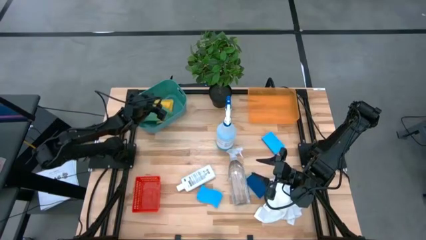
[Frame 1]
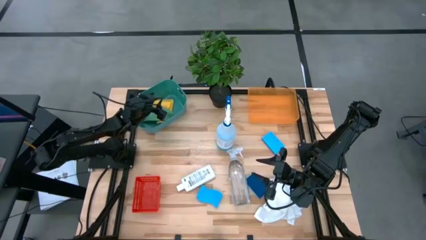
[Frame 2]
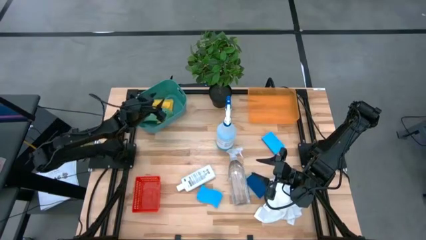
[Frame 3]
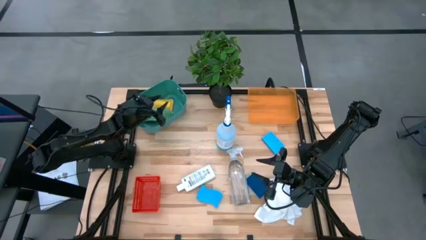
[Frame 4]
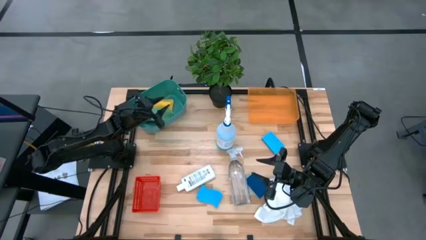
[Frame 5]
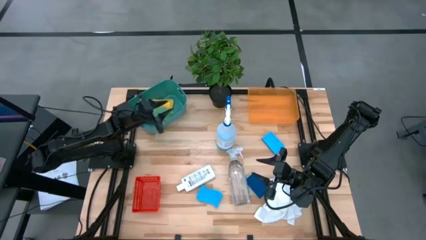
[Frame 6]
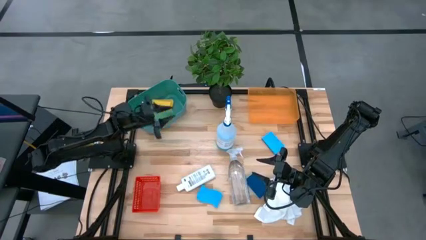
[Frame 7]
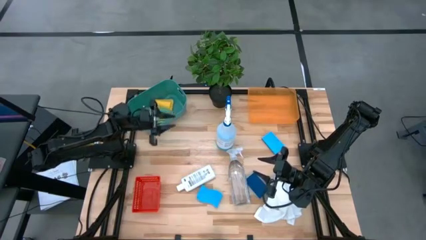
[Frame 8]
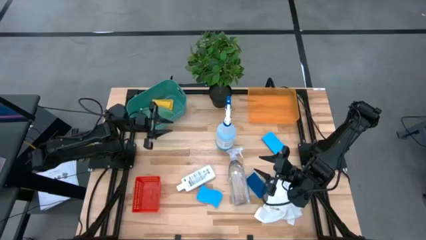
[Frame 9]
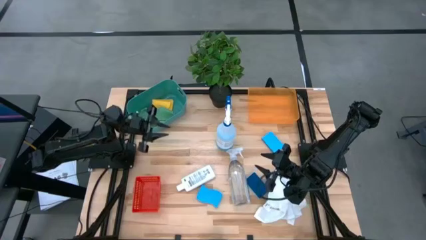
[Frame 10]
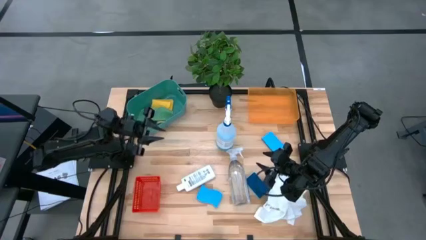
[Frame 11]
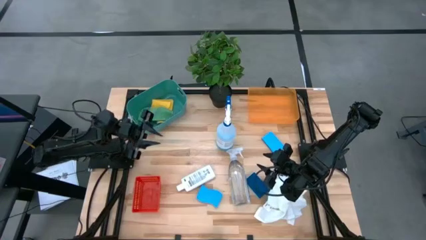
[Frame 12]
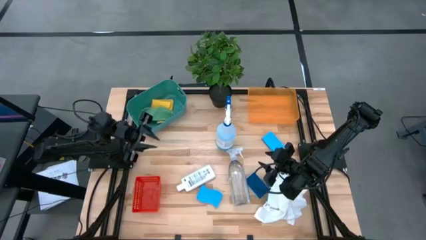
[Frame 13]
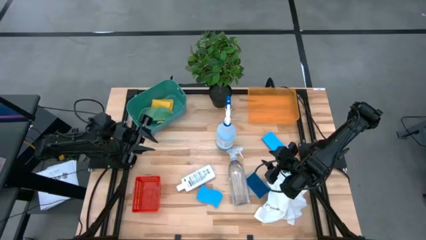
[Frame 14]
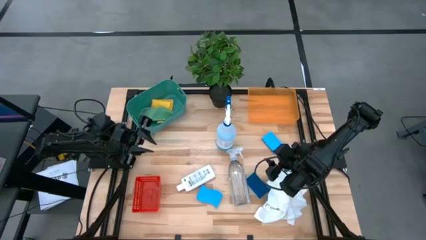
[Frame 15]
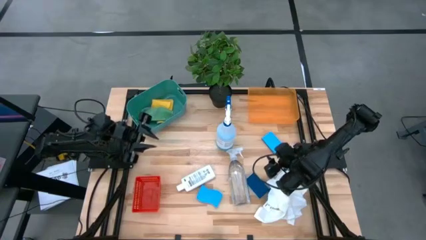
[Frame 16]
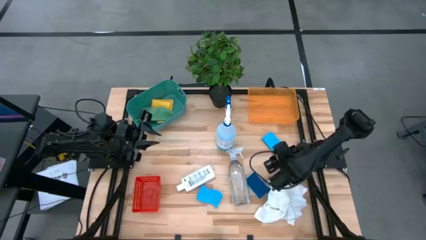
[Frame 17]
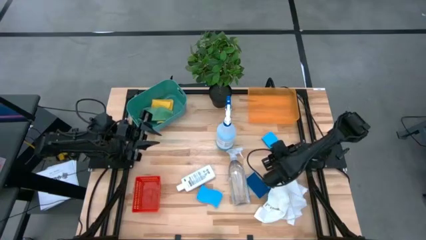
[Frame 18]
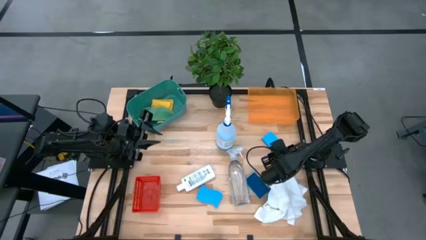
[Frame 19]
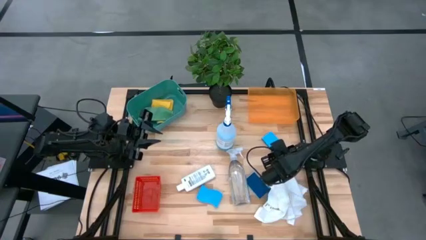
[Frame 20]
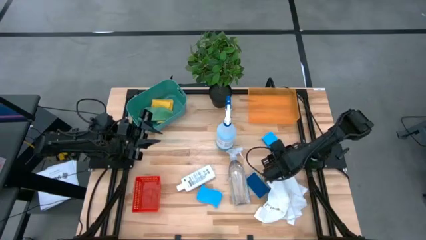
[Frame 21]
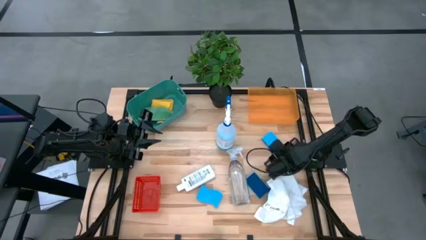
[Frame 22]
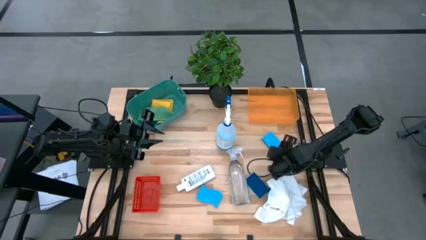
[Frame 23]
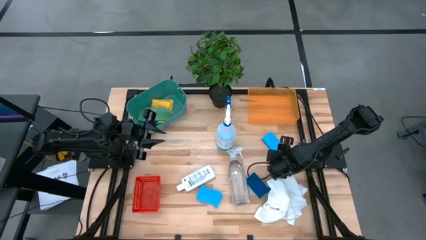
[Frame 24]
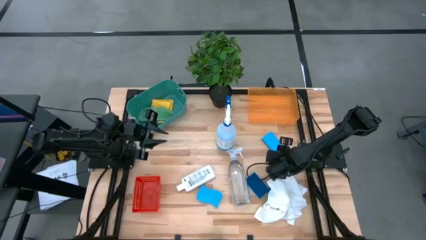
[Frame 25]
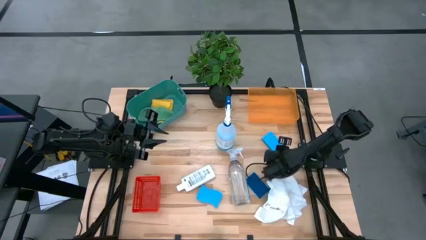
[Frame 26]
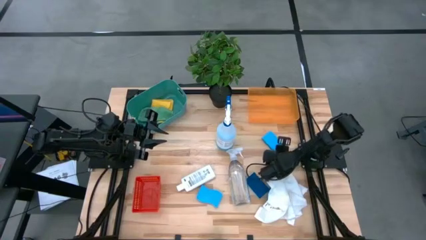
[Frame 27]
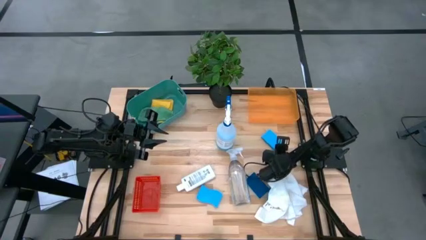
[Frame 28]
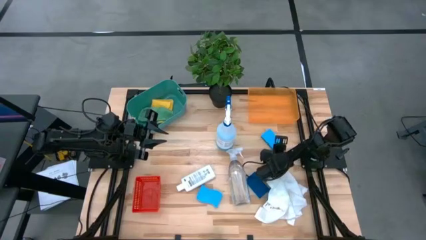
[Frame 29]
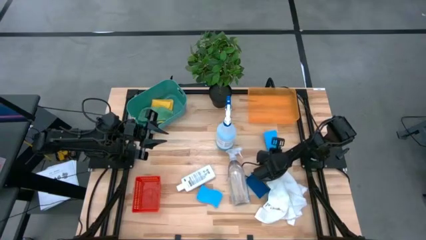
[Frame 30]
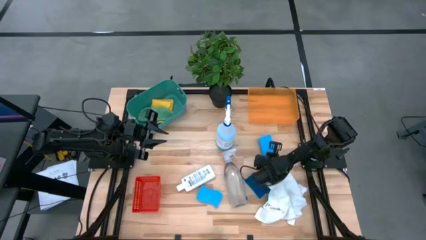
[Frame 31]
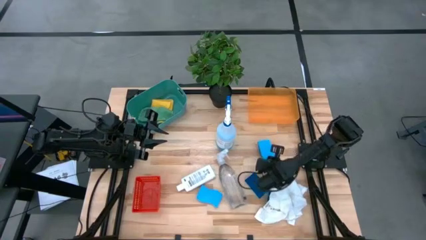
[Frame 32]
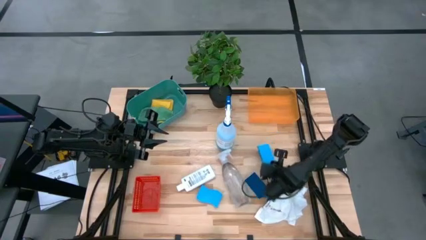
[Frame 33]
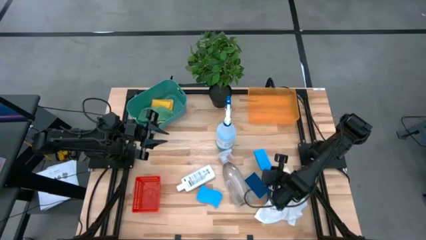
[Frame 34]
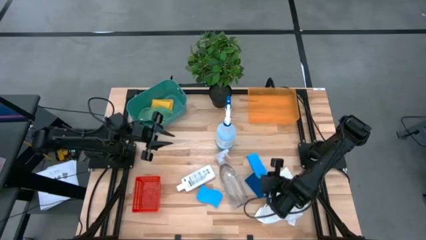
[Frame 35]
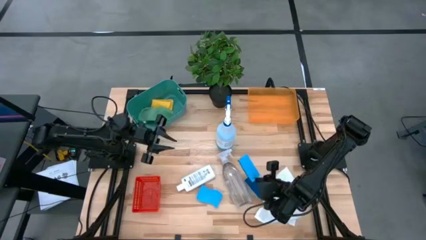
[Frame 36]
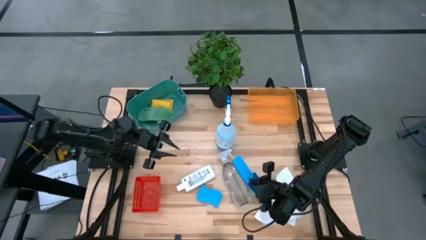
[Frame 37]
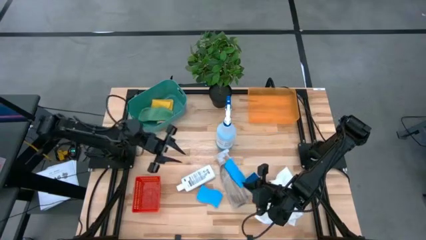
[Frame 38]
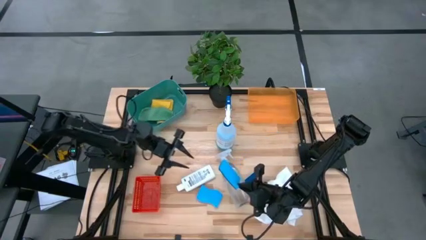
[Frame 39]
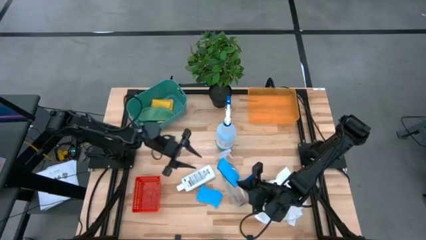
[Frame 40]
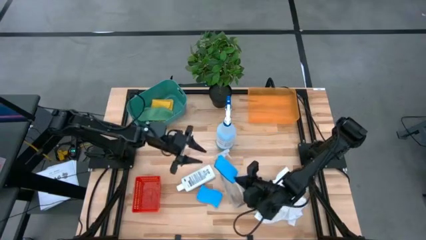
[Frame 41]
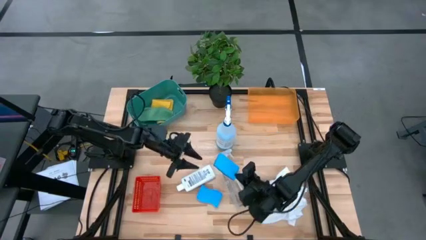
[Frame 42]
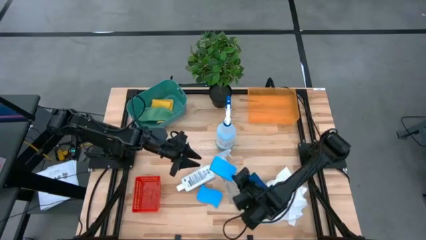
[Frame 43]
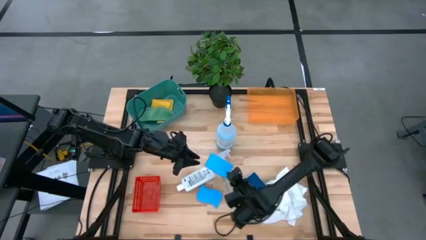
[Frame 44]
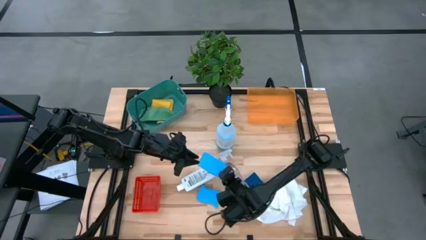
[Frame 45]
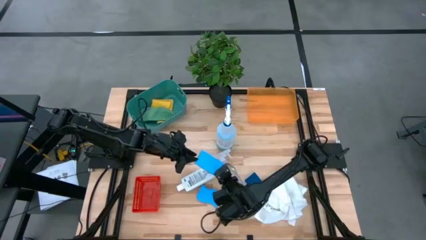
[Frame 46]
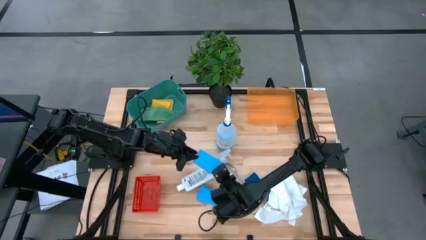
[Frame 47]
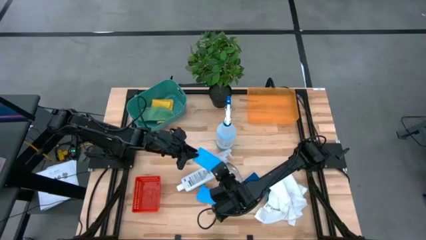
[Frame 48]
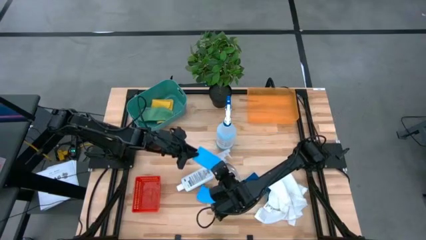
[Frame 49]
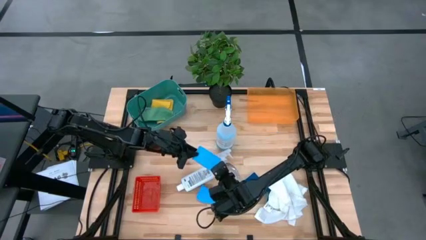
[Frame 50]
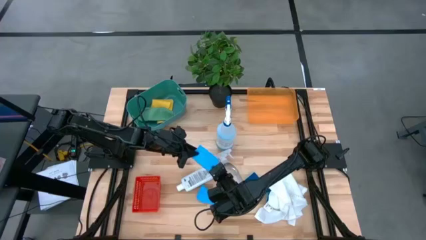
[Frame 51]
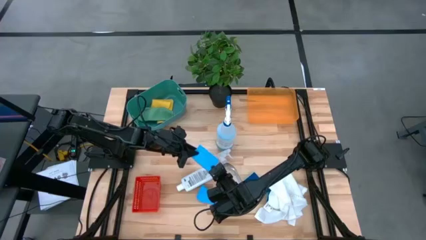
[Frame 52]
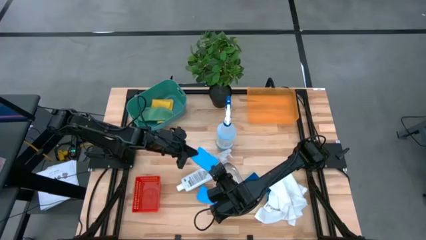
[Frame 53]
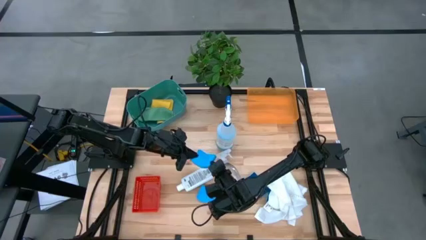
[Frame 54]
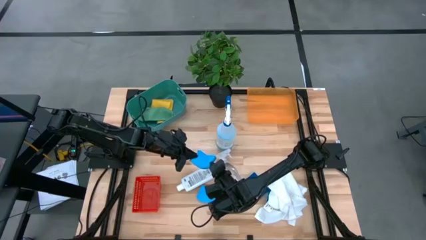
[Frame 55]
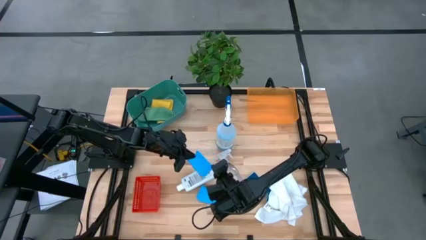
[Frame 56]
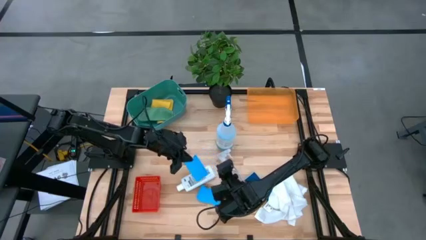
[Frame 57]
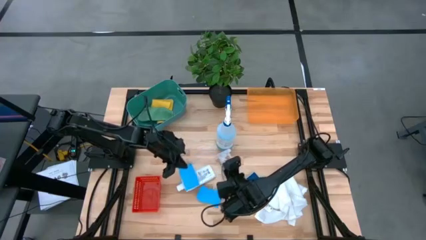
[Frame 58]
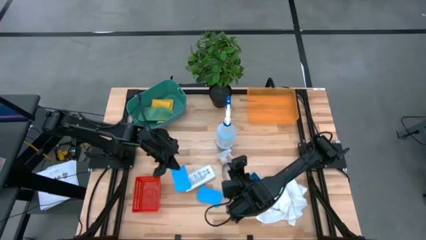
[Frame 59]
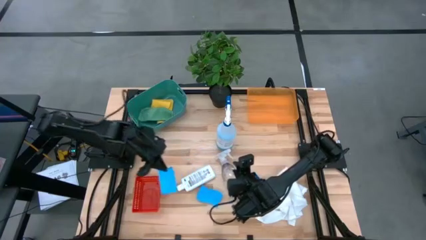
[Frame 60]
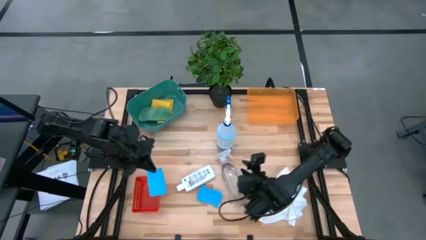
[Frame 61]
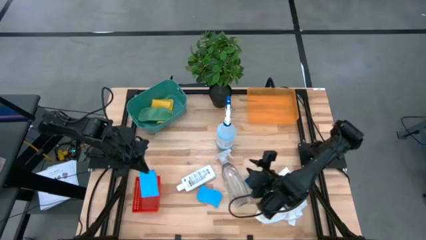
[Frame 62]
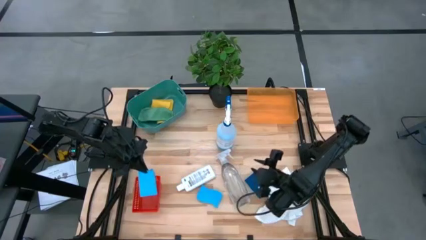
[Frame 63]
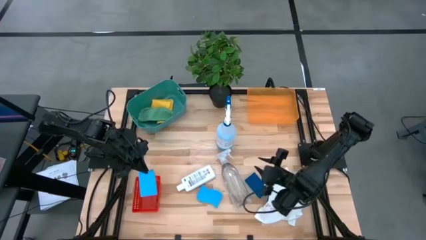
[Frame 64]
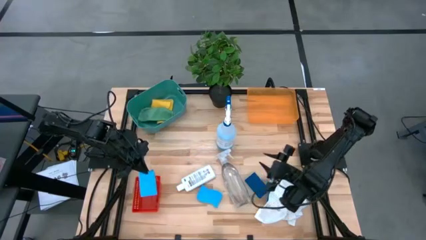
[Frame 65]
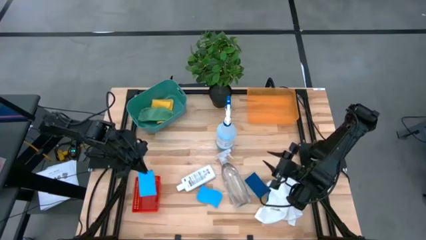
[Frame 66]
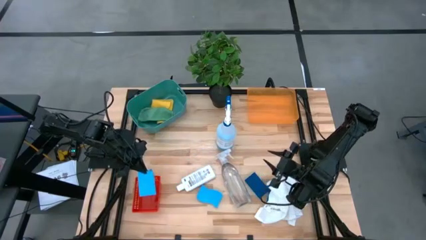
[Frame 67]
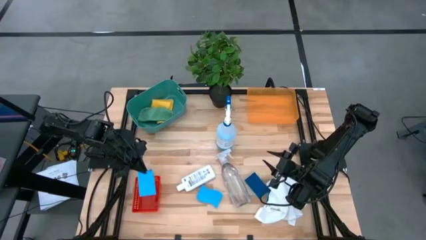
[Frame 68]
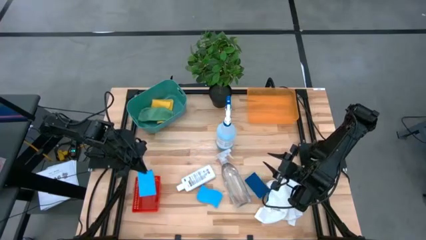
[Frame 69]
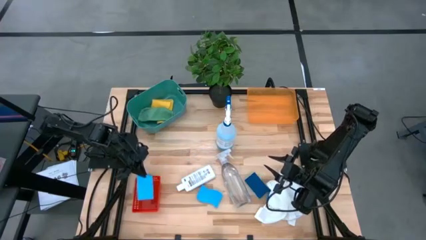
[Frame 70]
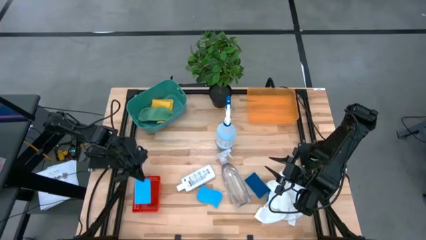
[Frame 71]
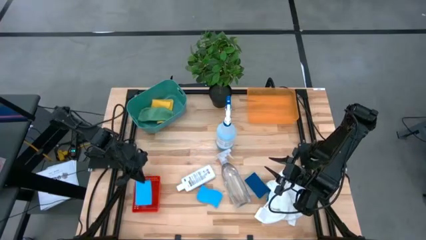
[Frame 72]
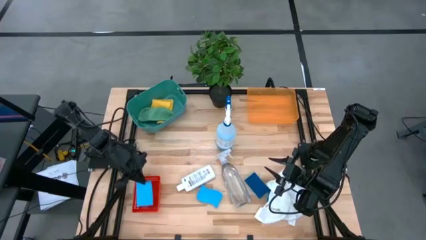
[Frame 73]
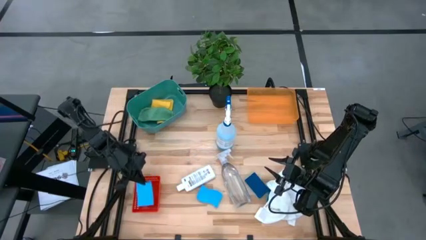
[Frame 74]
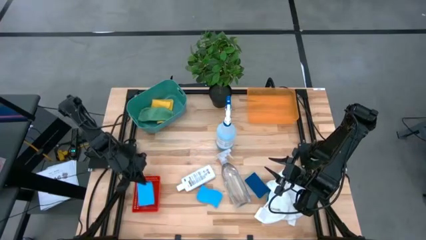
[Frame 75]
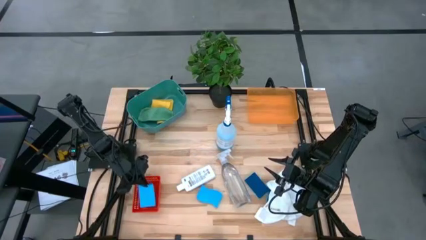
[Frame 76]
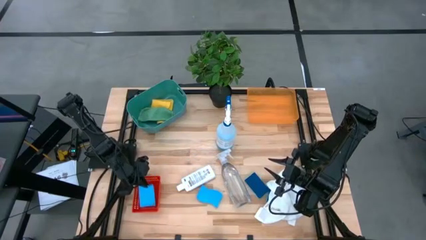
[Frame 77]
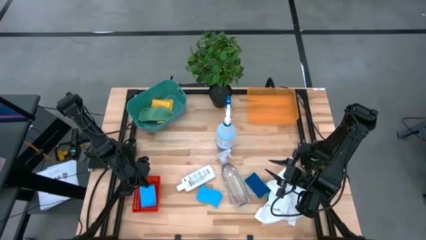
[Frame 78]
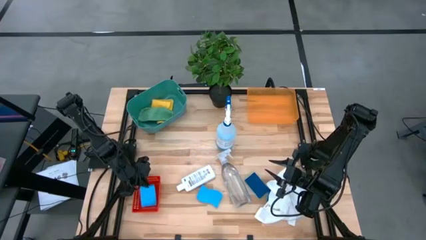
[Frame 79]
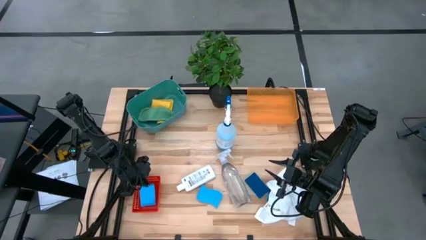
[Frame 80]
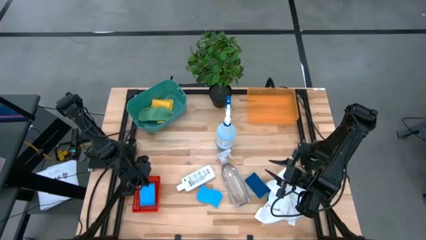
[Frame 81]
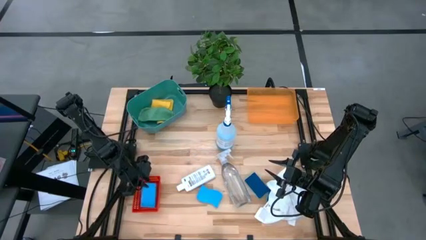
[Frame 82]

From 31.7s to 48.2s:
Task: Pick & Place Kitchen Items
Put the blue sponge into the red bin

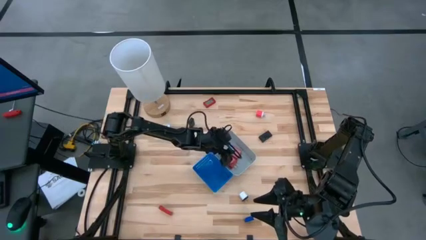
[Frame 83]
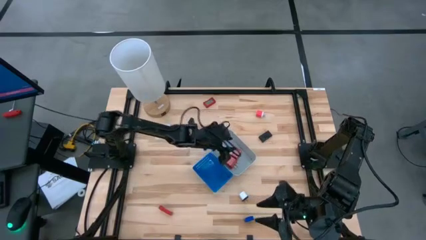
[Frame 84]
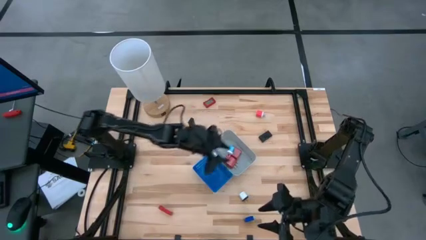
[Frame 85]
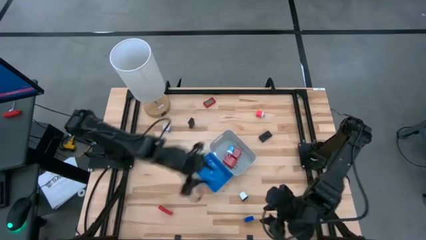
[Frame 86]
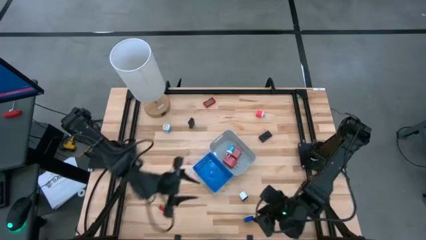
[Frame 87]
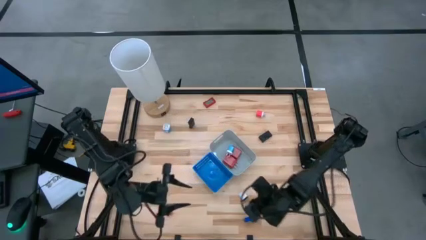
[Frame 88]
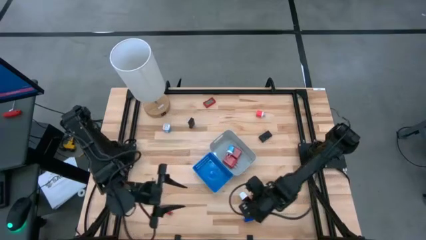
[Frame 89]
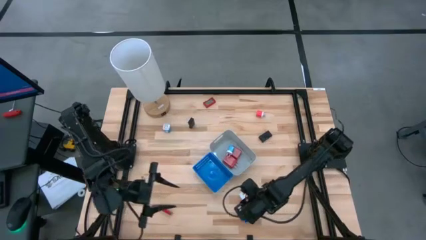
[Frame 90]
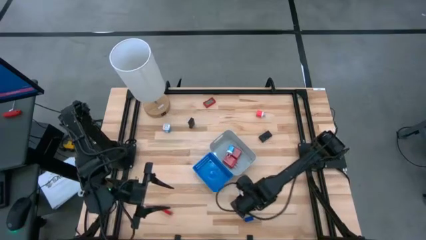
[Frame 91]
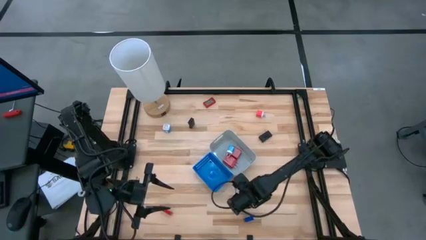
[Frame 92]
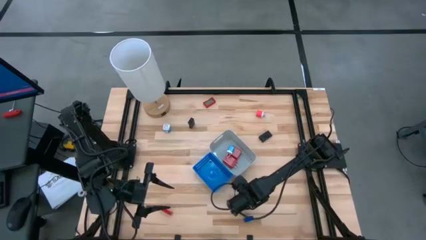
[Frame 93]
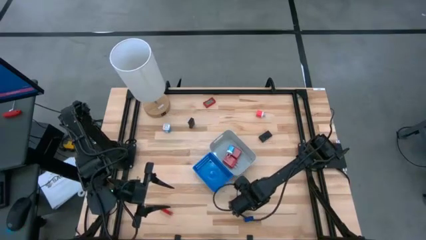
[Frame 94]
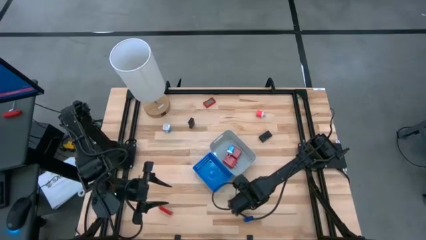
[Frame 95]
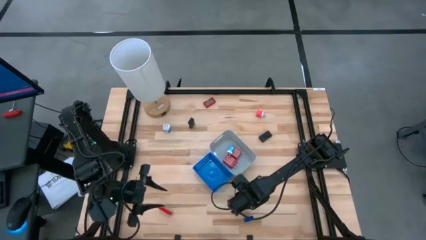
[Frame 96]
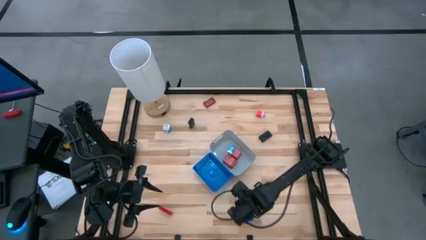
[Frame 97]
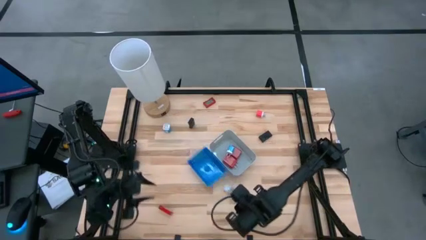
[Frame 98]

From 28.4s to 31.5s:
Task: Pick & Place Office items
Put the white charger adapter into the gray bin
